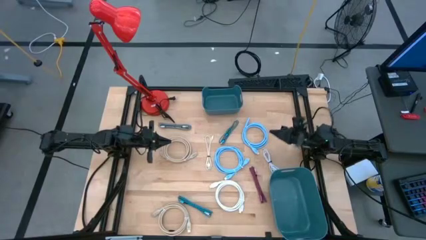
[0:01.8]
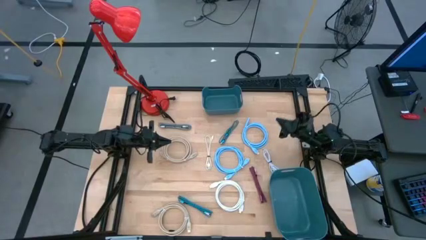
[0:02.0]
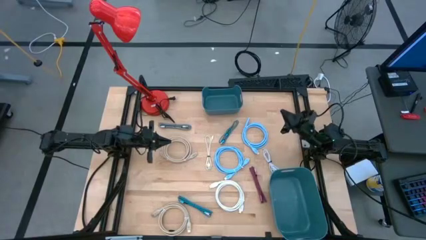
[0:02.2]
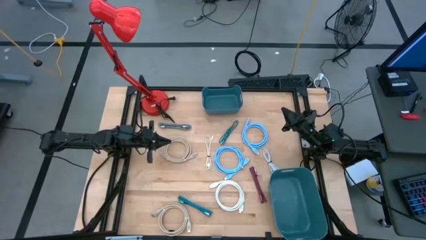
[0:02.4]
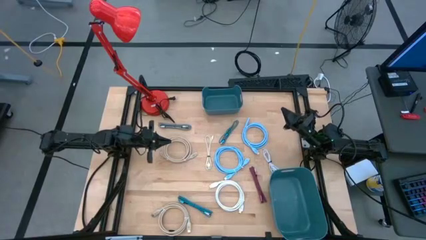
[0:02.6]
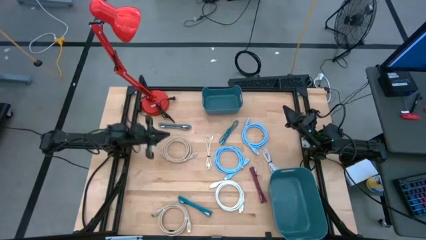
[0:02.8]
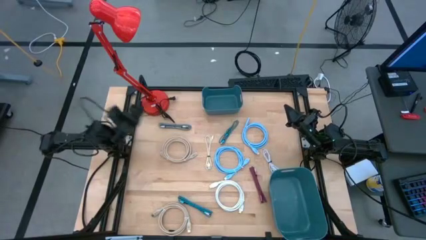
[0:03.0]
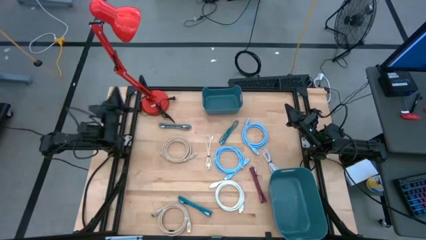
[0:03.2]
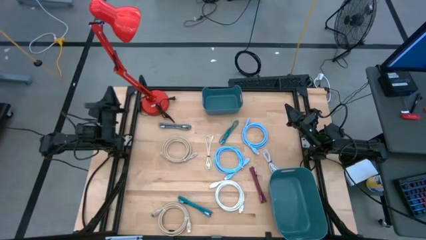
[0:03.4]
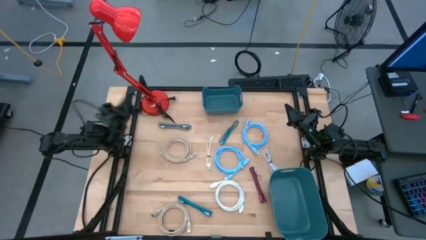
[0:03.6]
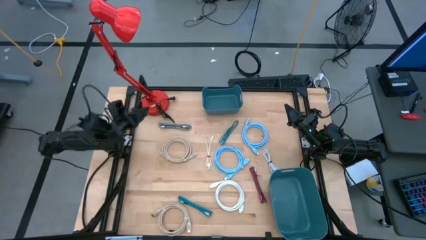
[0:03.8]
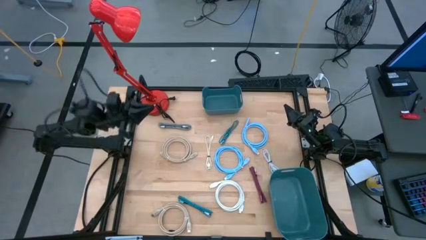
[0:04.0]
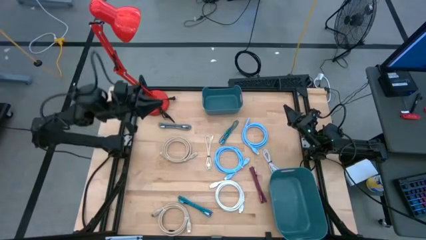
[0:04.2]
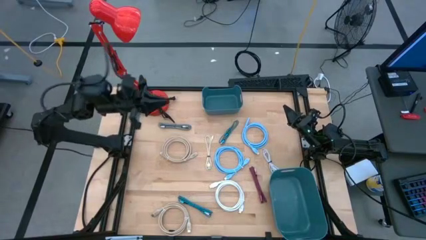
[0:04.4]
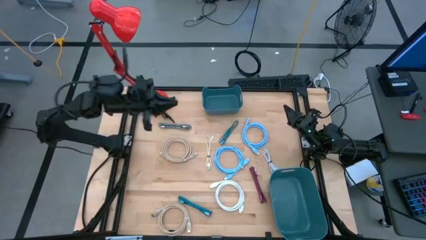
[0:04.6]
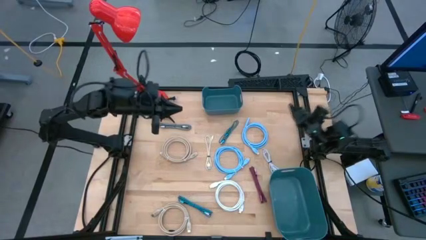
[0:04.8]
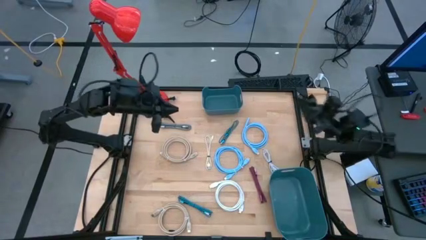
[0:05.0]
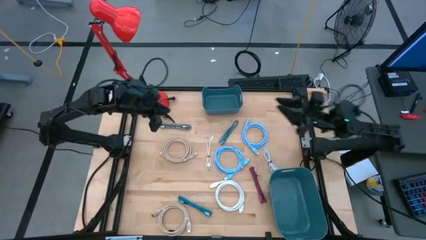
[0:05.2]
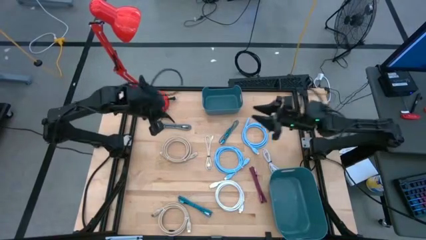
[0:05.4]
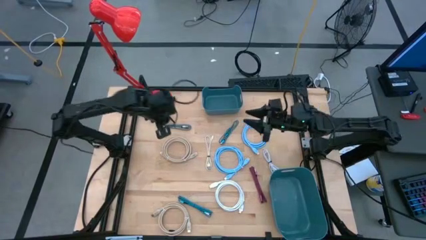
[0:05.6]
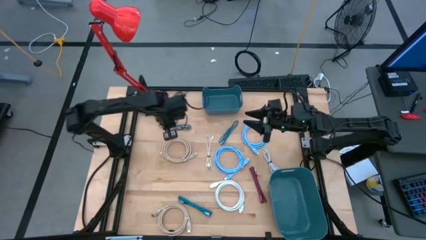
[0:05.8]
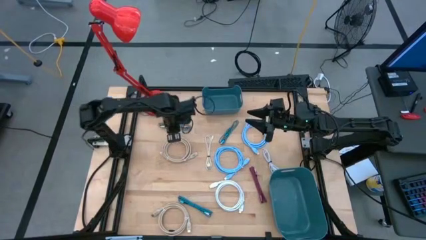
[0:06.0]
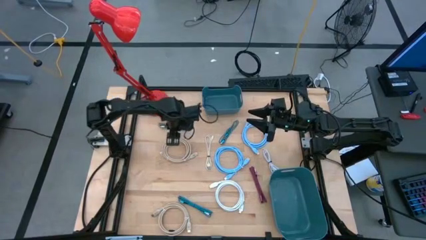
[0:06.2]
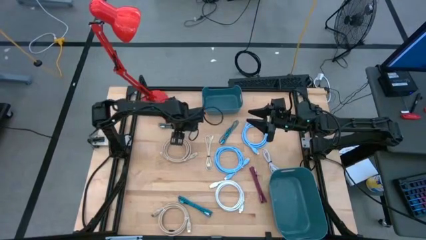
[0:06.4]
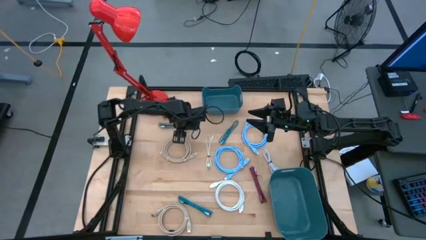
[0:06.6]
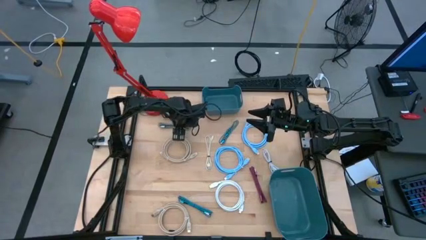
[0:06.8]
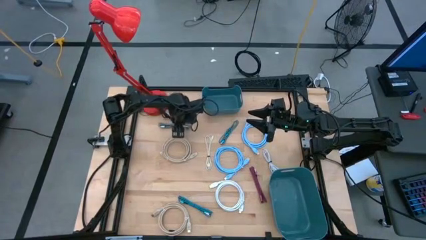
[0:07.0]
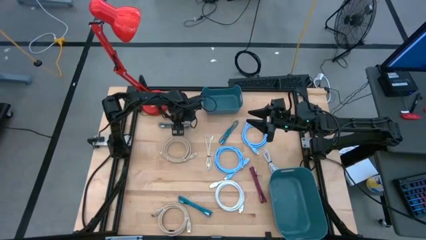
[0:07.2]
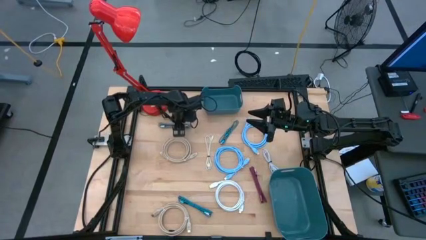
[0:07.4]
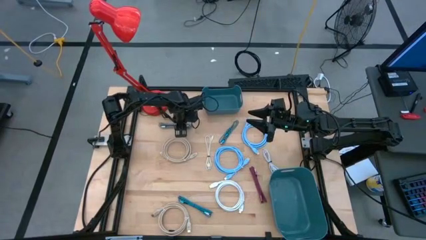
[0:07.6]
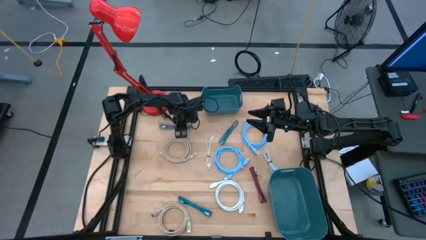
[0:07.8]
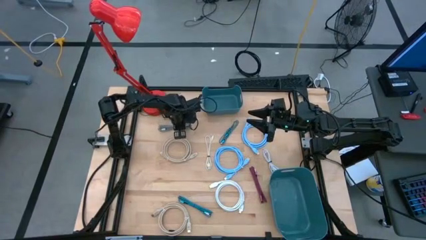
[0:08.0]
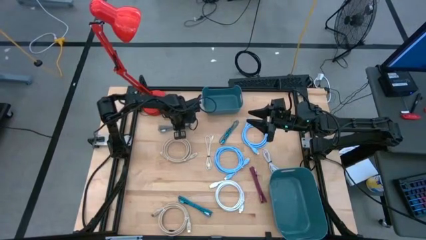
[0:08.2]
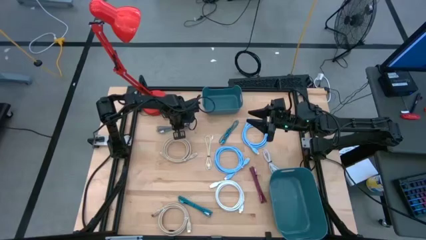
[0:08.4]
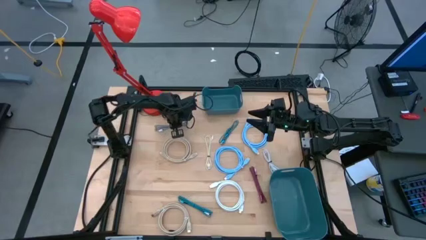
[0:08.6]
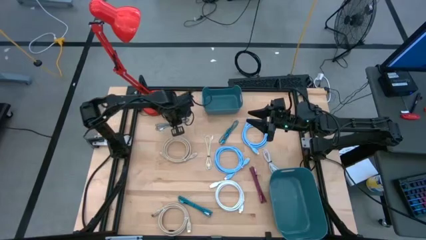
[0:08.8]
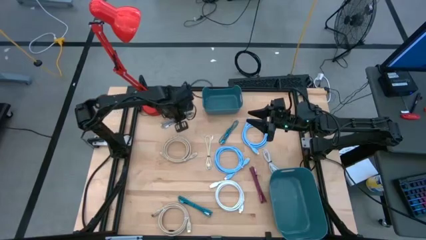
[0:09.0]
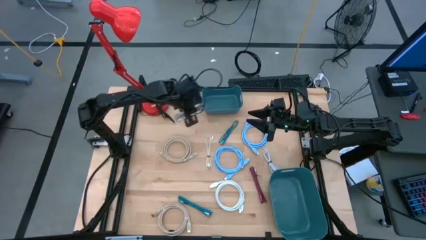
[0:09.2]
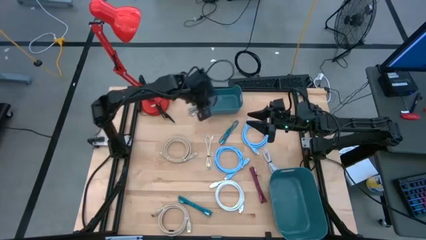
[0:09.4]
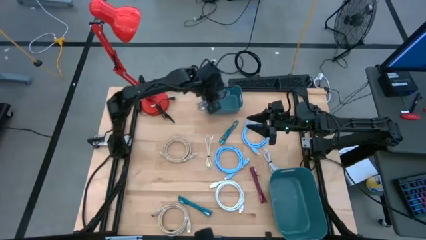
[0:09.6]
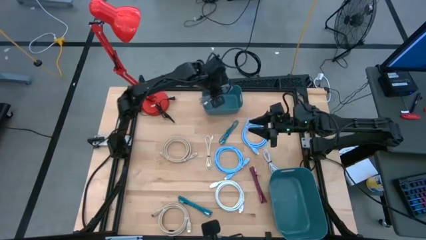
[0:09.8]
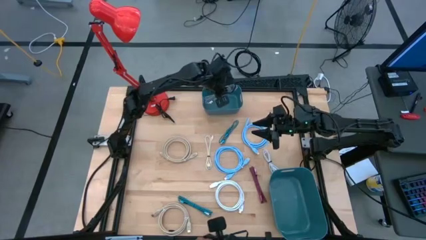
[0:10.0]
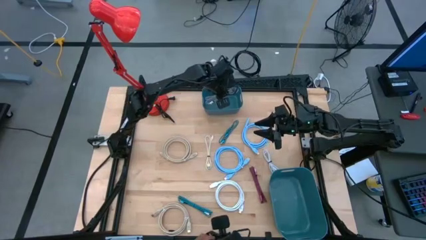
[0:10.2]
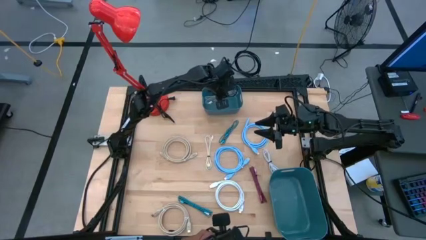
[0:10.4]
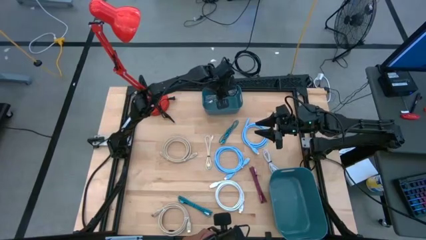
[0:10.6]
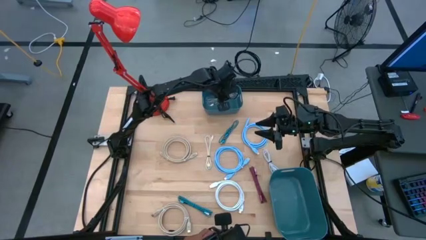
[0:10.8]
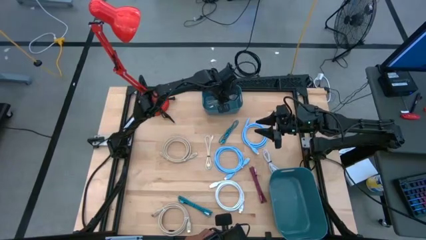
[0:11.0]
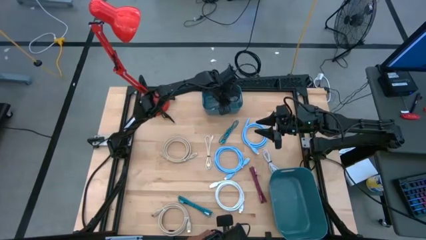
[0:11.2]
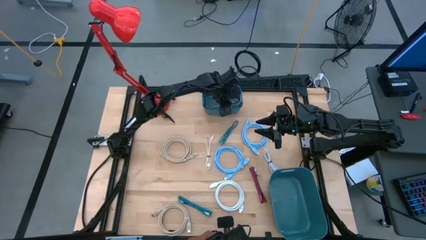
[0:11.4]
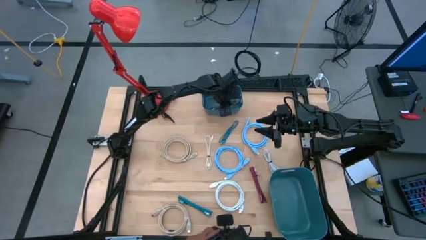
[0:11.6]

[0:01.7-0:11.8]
Task: Pick & Place USB Port
Put the white and black charger cable into the top blue bin

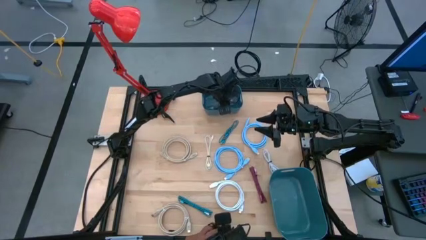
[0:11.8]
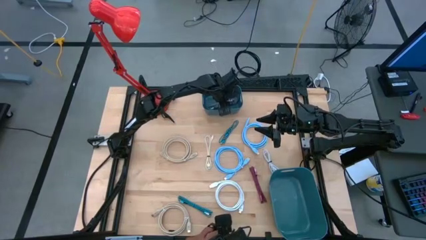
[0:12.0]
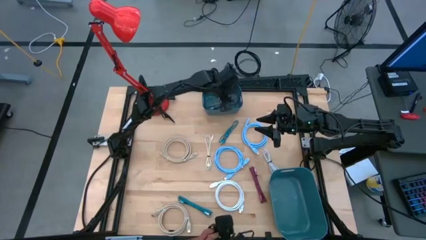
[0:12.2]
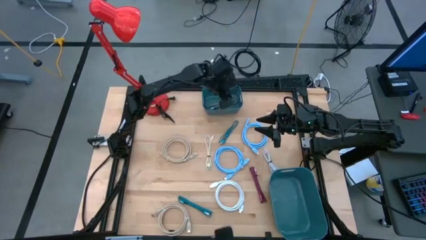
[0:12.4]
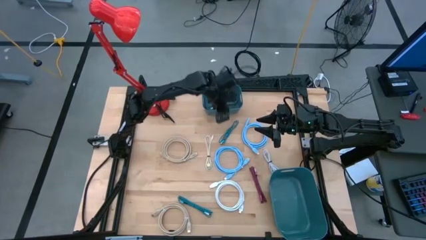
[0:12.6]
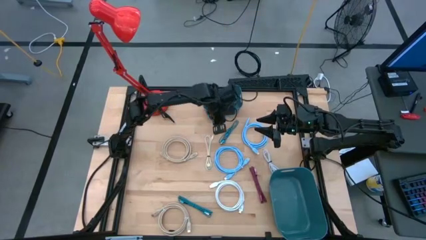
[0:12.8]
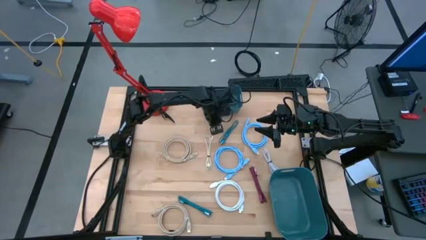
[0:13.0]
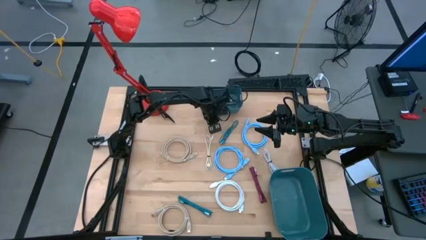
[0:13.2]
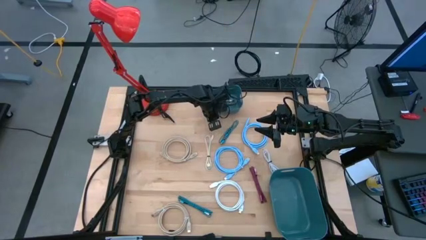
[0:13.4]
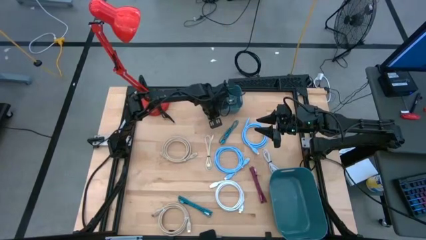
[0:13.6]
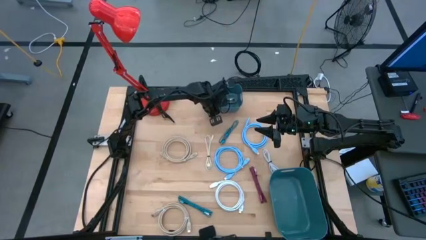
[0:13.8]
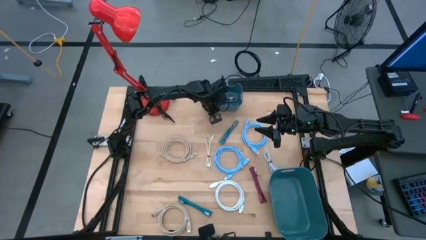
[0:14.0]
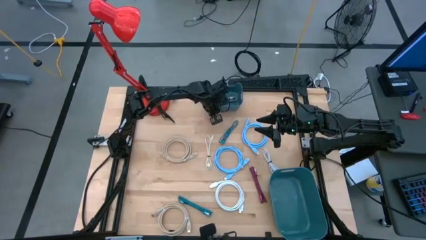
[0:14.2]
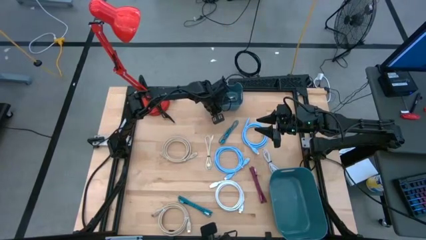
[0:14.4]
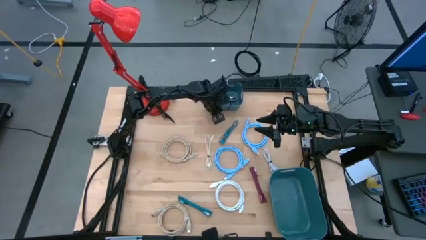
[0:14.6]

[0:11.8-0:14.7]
Adjust the blue bin

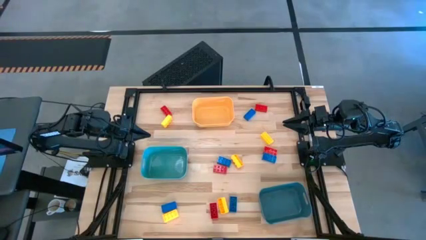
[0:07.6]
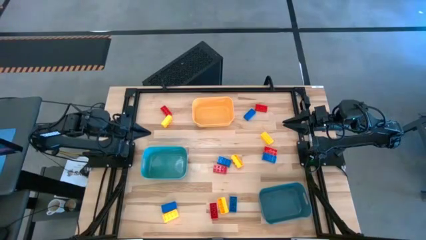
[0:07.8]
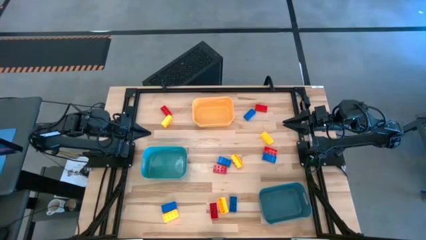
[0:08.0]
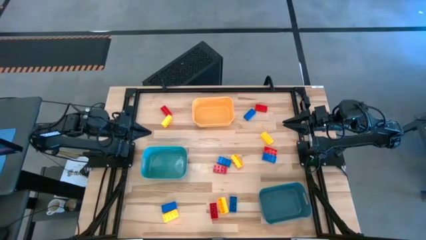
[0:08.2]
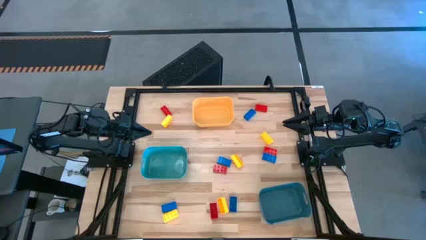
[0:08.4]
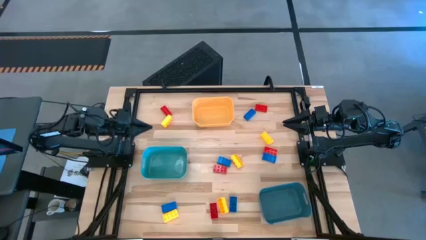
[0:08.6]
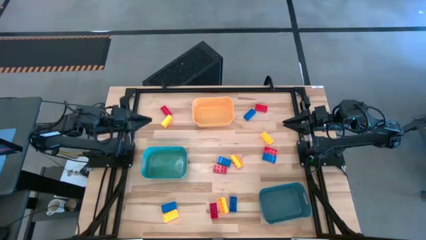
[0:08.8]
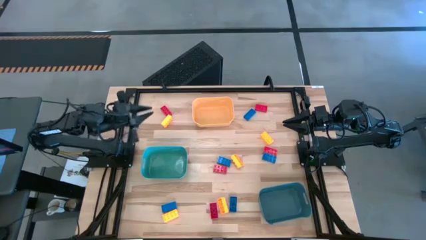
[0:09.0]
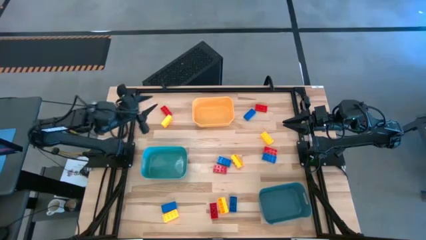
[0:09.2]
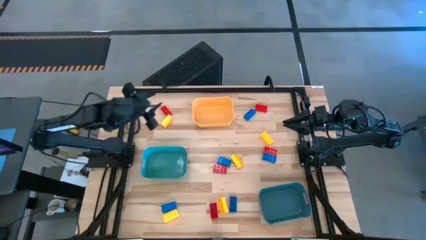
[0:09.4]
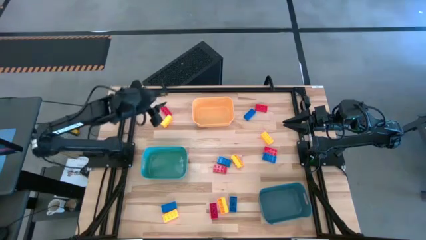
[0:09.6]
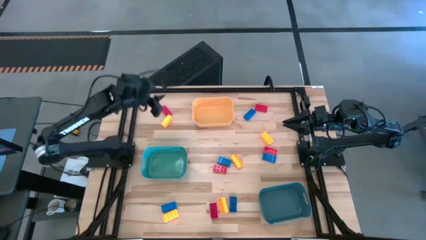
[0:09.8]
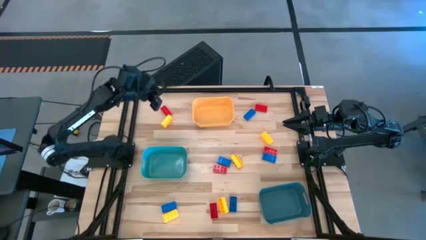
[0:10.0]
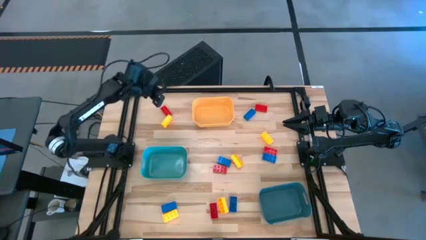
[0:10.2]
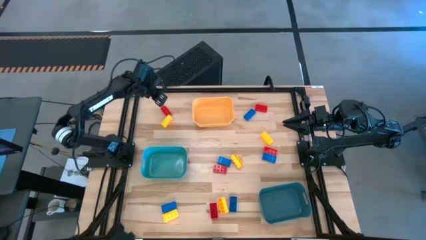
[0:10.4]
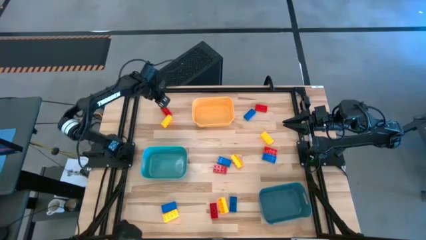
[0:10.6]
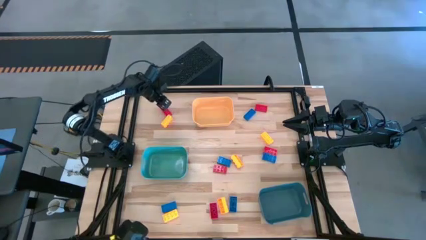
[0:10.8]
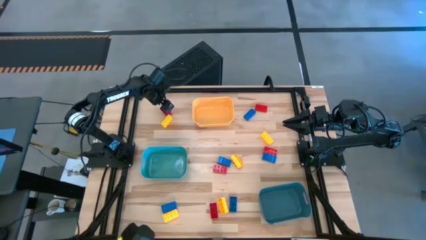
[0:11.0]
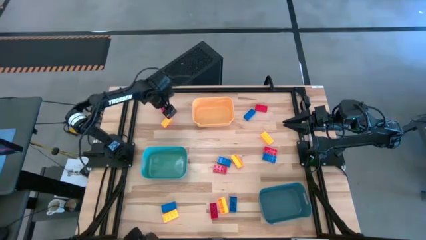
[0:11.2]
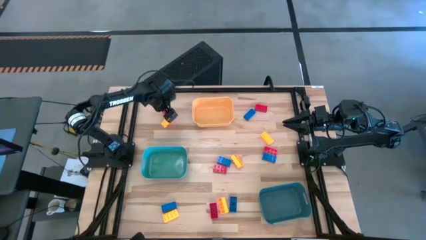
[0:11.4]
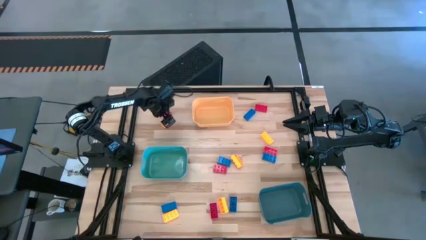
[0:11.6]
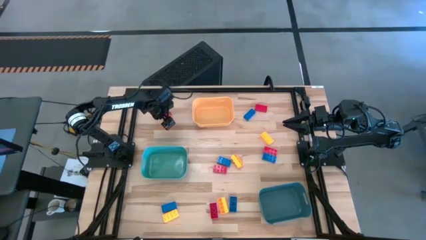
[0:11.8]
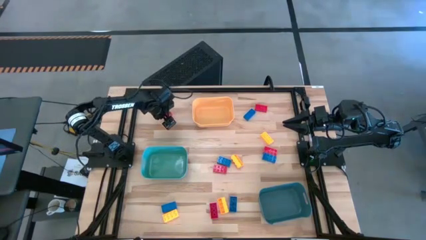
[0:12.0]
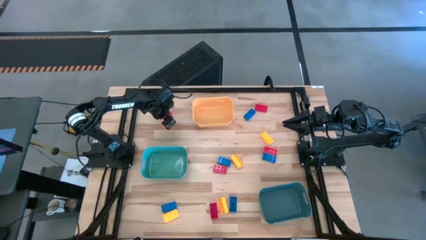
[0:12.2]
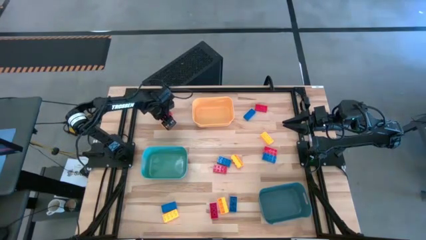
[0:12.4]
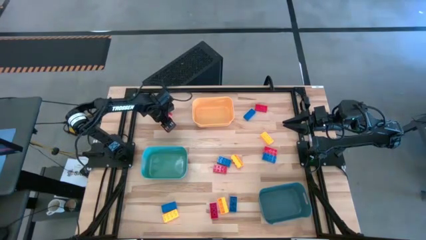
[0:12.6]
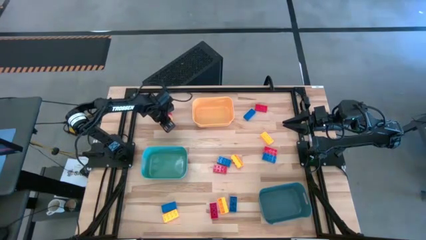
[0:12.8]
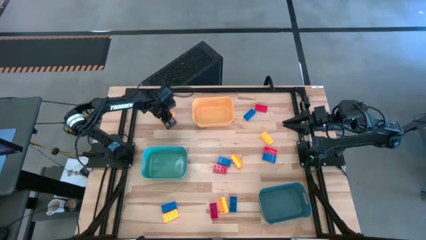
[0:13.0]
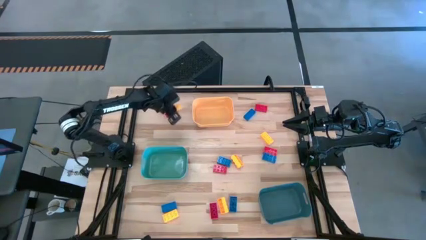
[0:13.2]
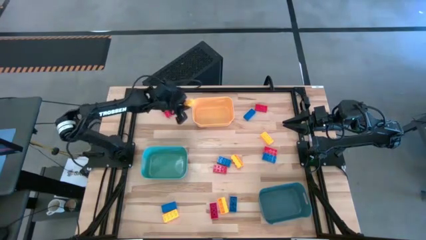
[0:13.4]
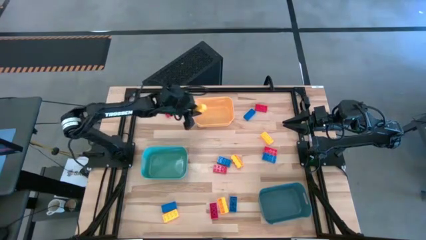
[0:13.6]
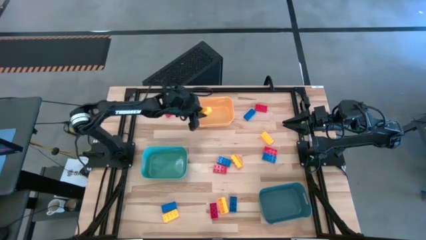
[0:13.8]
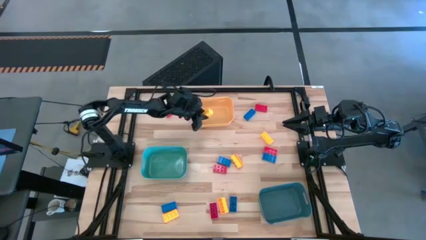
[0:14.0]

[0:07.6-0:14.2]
Task: Sort & place blocks by color
Put the yellow game piece into the orange bin
